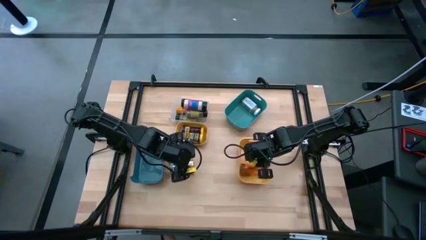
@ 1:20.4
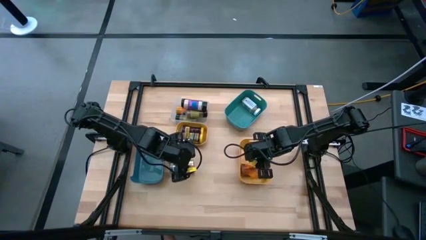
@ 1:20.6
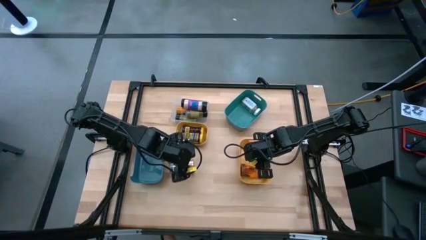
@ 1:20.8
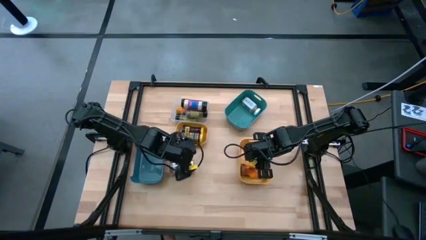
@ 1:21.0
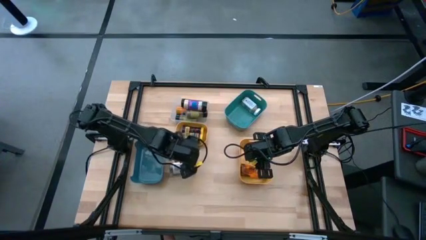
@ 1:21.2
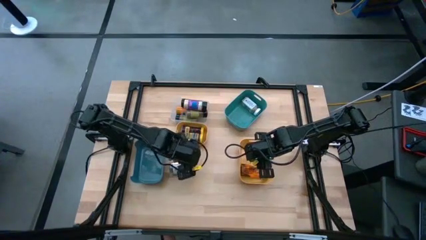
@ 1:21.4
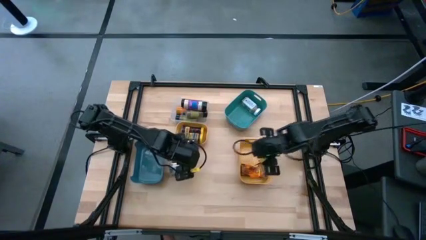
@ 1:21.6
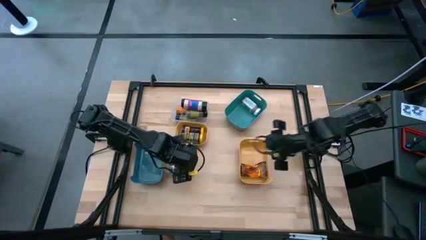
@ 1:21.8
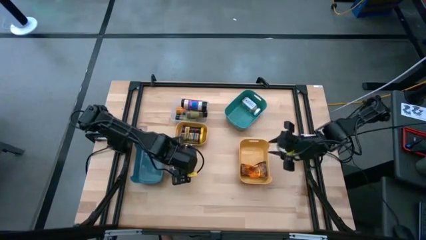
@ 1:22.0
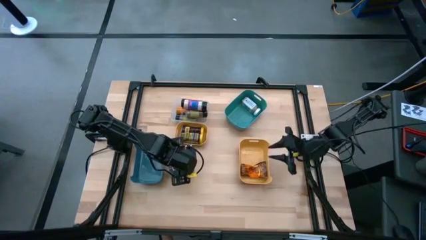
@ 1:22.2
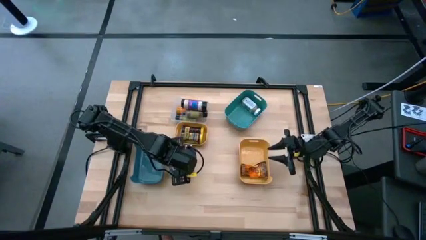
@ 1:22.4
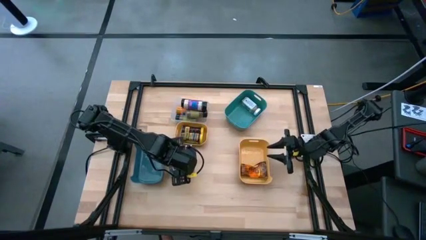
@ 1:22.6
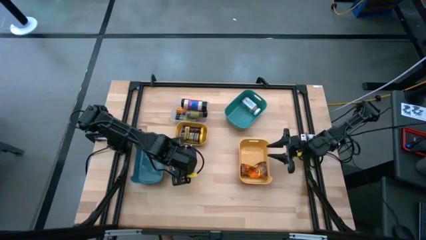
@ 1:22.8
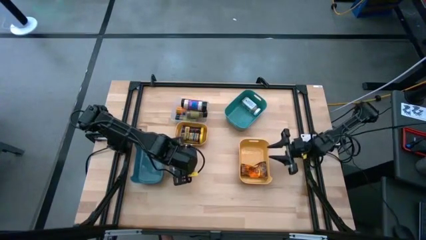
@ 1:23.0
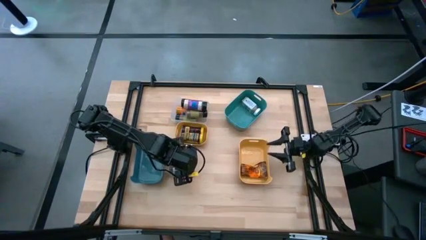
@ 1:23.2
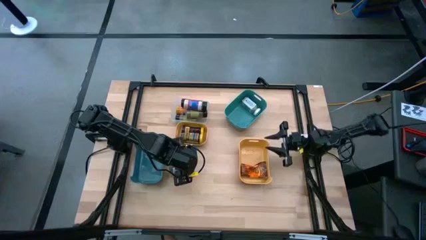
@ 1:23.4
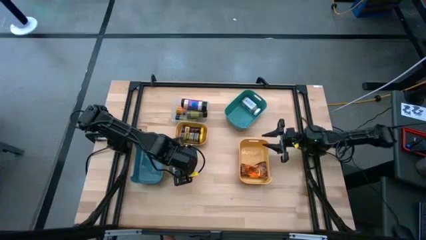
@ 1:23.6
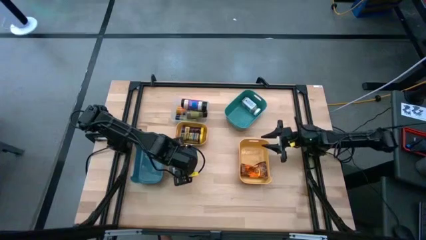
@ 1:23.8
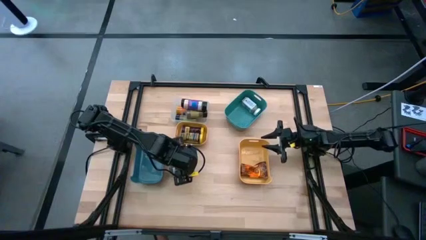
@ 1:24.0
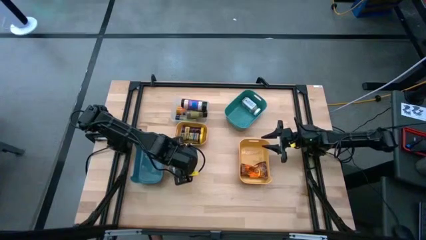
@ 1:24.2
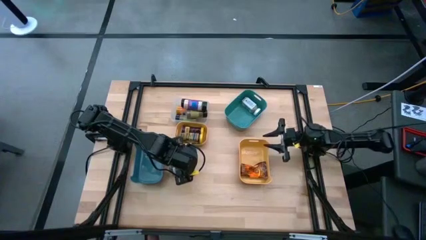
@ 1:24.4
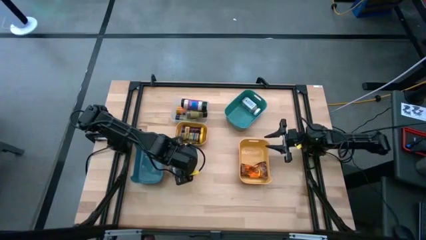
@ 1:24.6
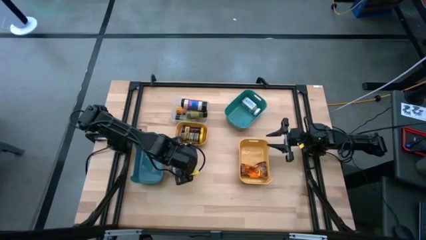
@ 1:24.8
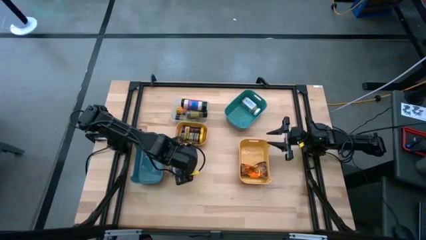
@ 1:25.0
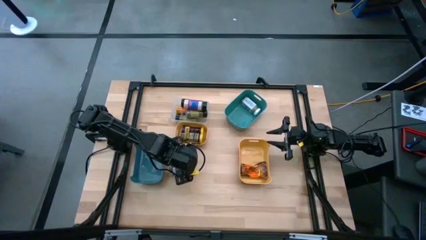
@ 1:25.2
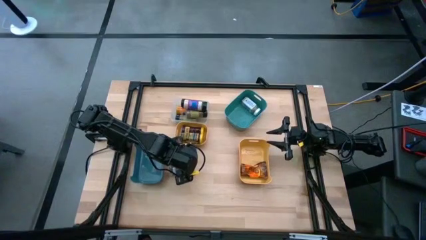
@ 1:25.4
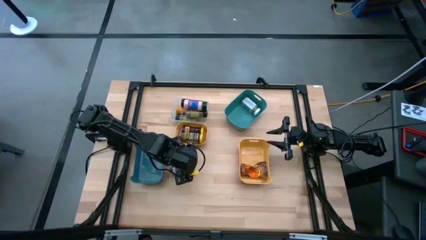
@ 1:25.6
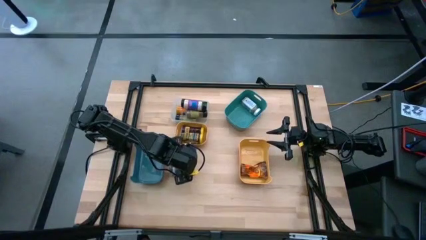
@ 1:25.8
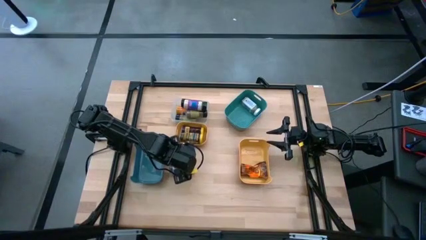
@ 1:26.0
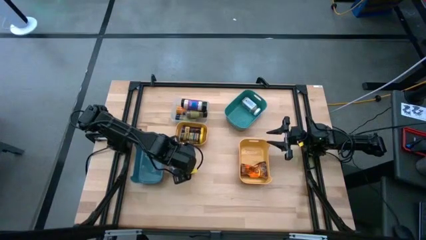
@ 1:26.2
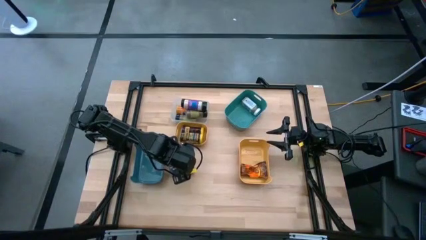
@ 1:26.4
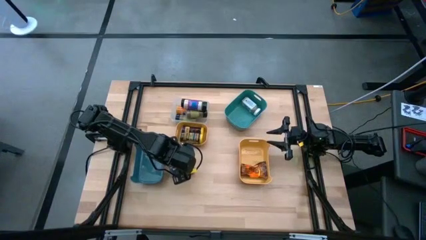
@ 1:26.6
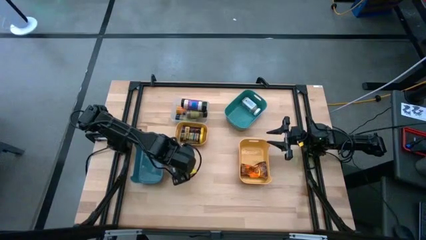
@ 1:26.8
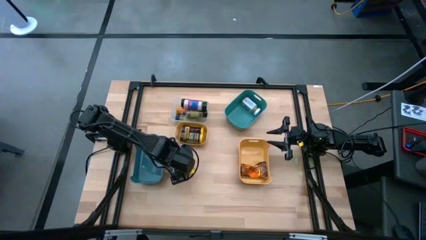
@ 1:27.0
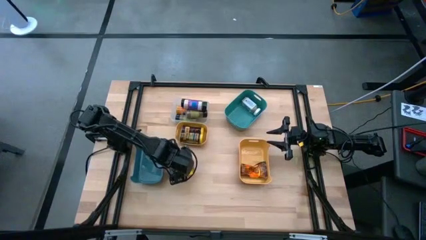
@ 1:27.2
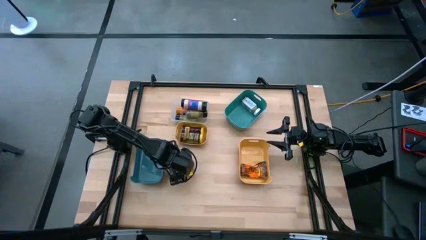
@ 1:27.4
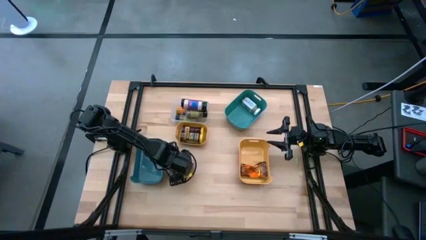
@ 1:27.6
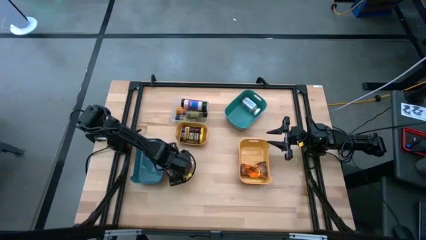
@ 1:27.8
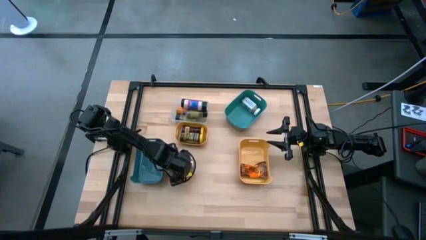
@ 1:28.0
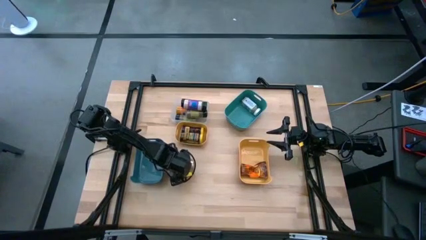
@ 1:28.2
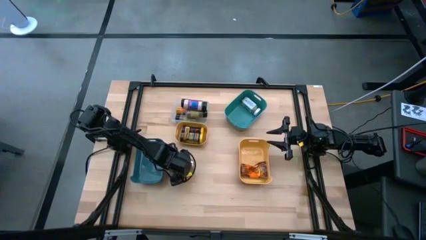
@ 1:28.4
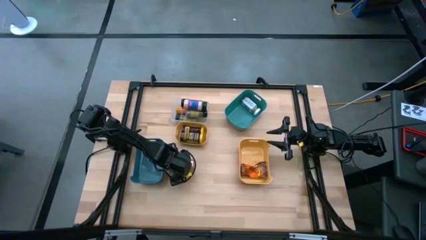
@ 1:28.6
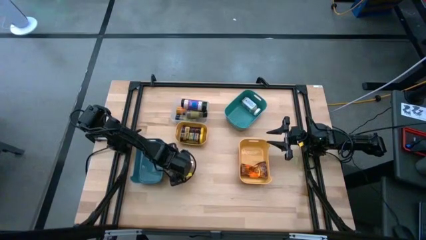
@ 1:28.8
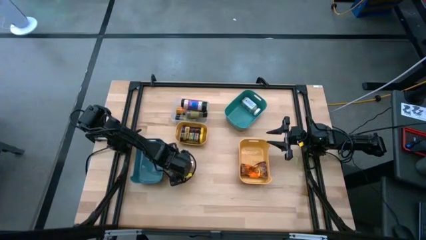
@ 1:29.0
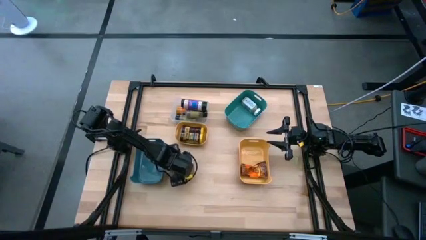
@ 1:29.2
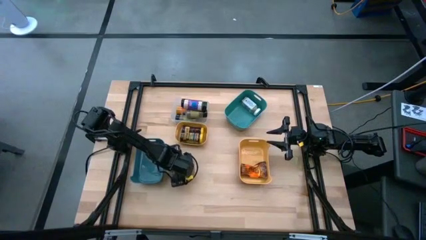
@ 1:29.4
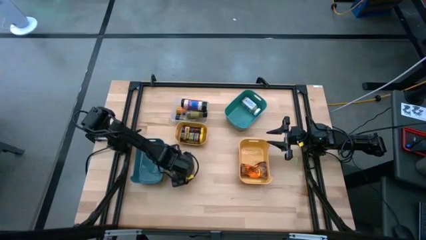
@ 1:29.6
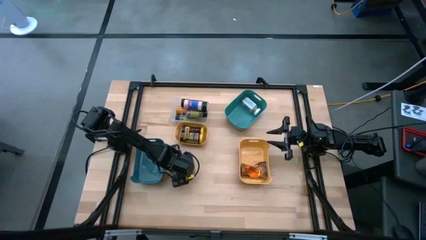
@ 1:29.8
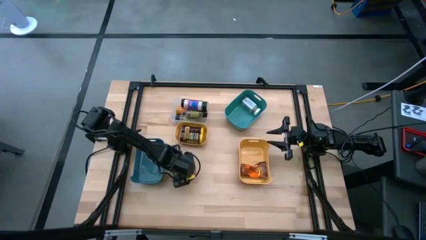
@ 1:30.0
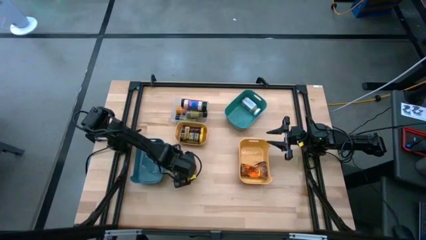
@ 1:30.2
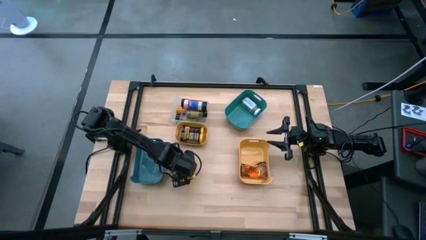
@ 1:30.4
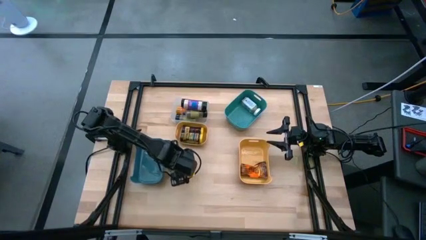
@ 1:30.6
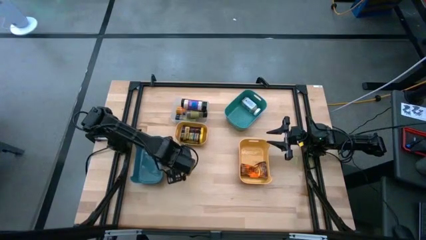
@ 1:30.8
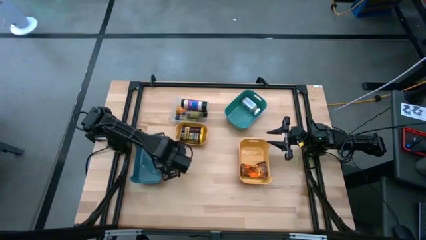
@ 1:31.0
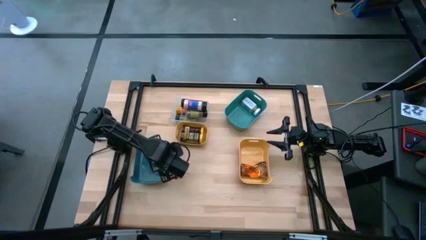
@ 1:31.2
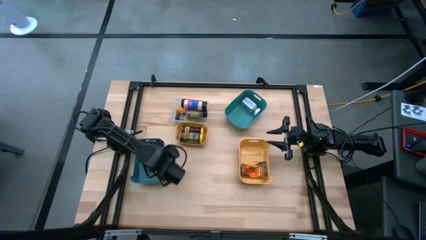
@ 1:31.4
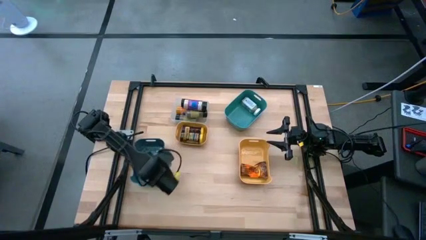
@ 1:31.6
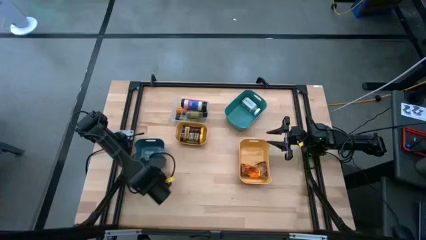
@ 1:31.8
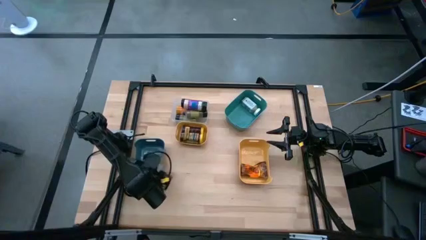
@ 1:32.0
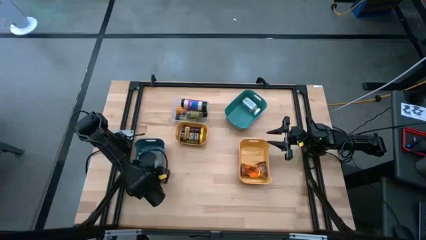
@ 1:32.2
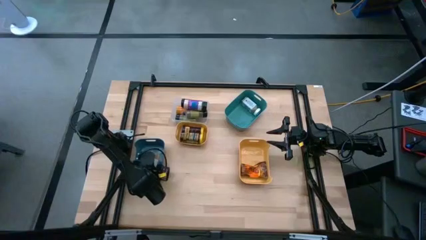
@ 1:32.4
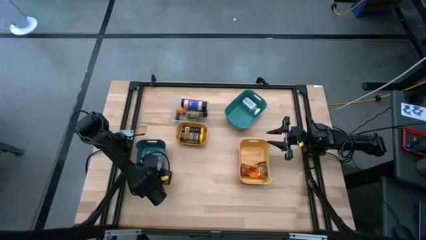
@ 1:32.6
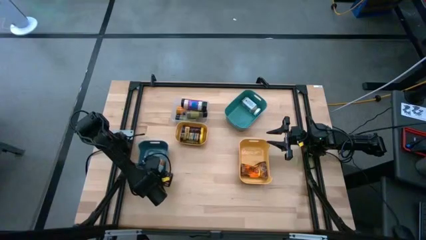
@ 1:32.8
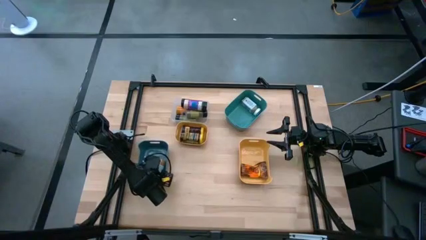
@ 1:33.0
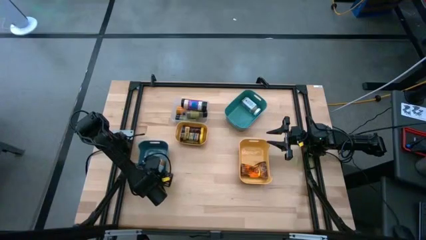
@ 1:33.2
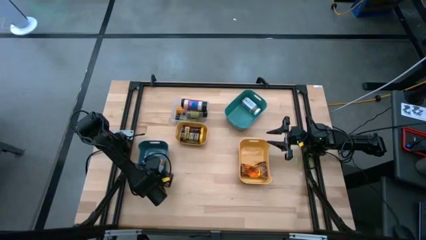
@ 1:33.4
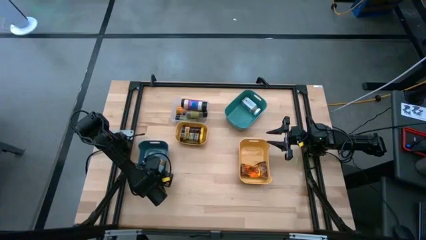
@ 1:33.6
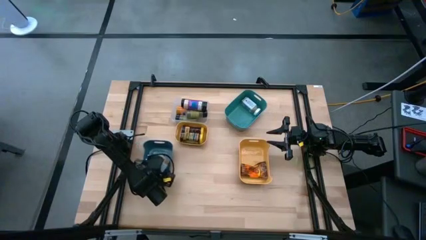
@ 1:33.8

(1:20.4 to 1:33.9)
Task: Sort spices by type
Put the gold seasoning bottle into the blue bin

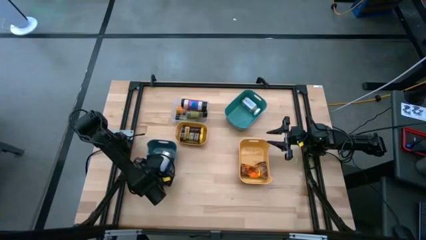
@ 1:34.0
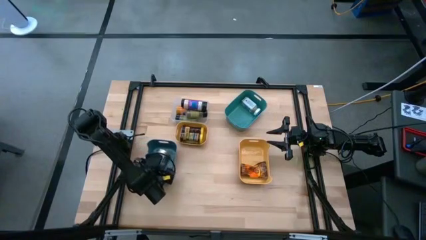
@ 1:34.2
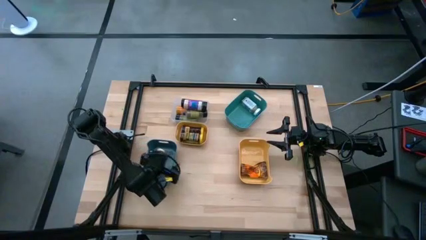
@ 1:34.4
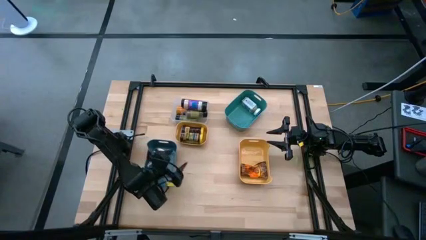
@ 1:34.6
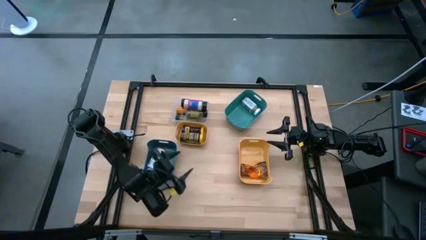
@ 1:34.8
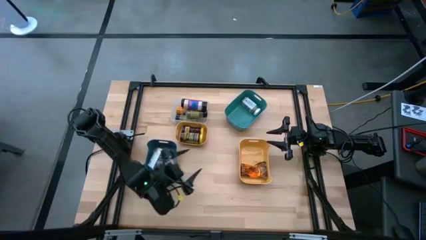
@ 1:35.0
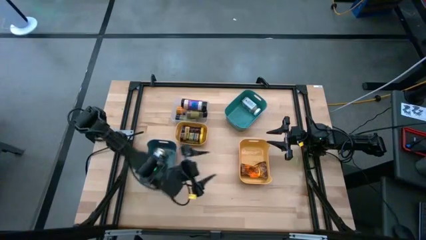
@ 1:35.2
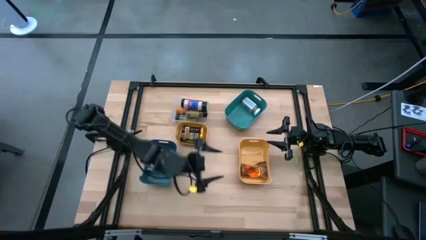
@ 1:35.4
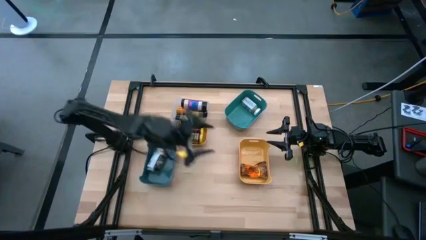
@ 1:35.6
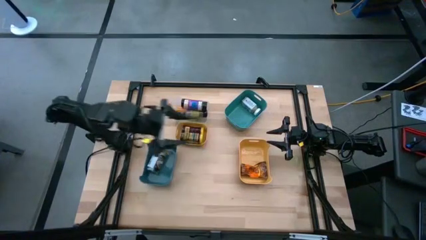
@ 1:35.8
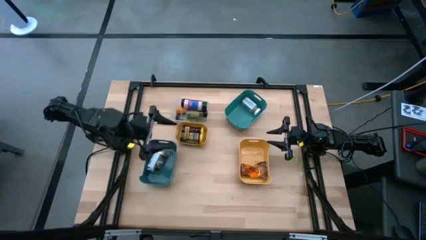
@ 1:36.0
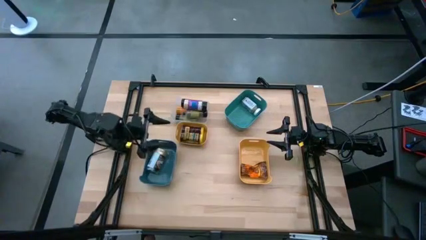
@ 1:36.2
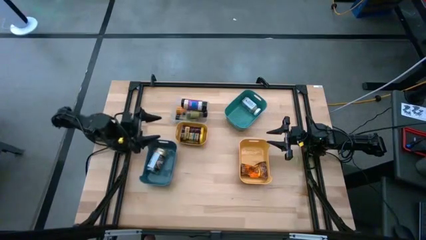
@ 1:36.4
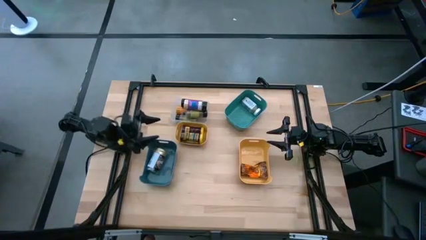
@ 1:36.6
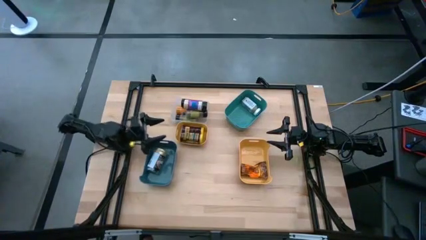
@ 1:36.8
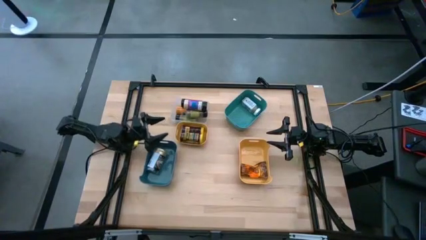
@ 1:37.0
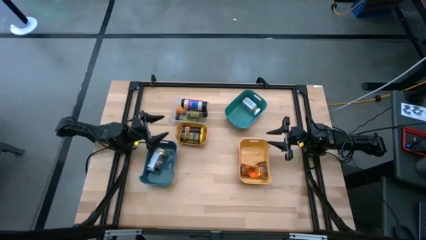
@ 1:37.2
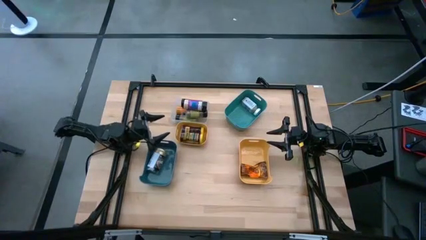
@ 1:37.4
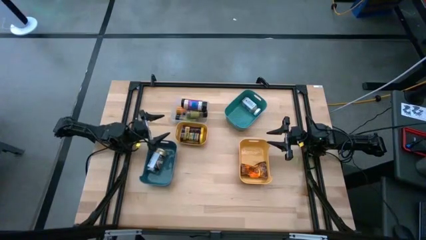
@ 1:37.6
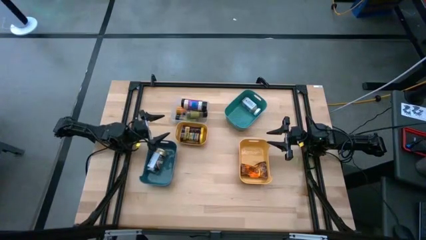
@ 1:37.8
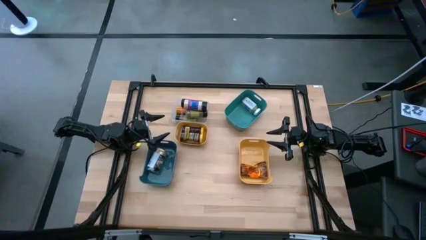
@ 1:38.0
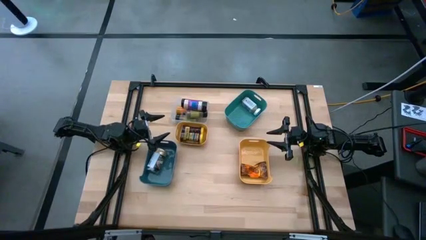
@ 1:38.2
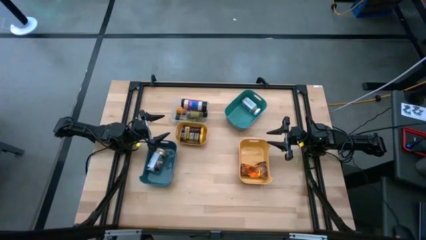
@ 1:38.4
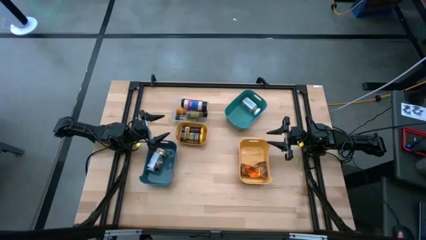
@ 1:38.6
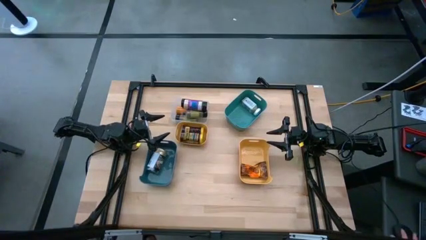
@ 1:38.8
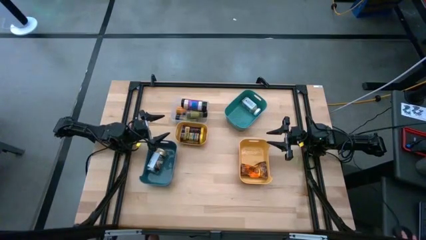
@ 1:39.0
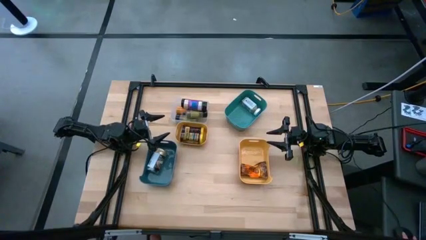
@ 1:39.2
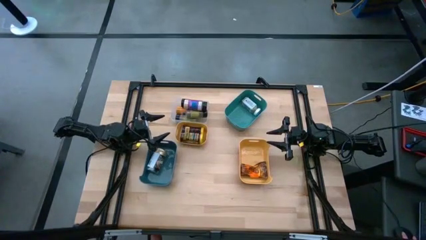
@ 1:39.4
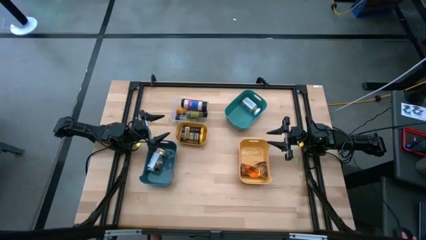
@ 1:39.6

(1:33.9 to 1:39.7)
Return to Home Position
